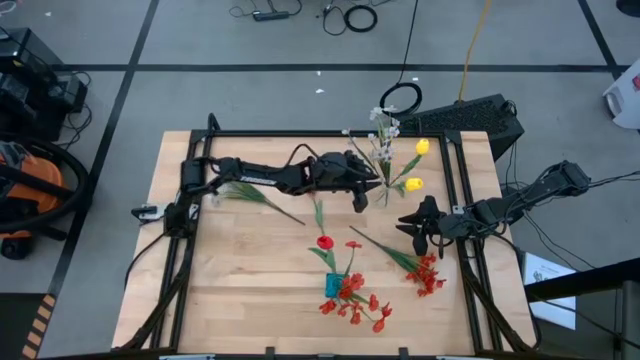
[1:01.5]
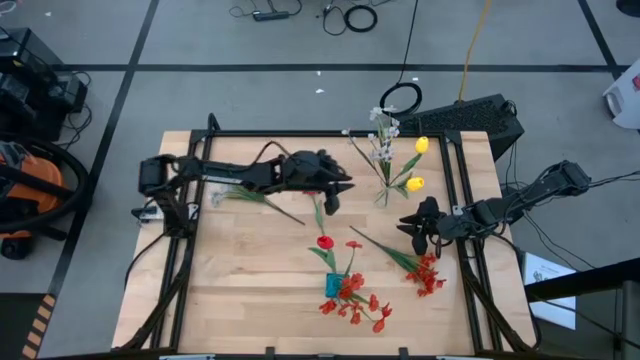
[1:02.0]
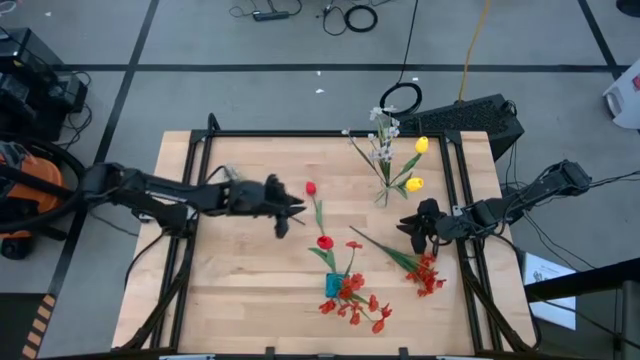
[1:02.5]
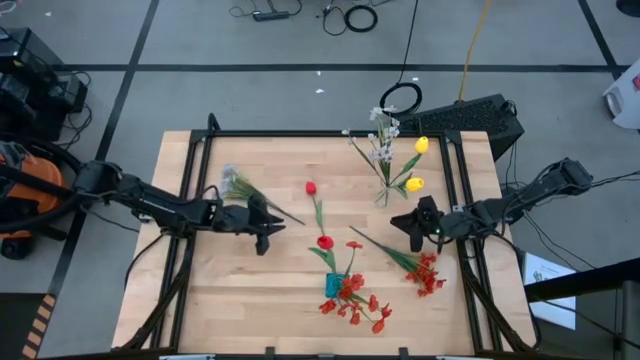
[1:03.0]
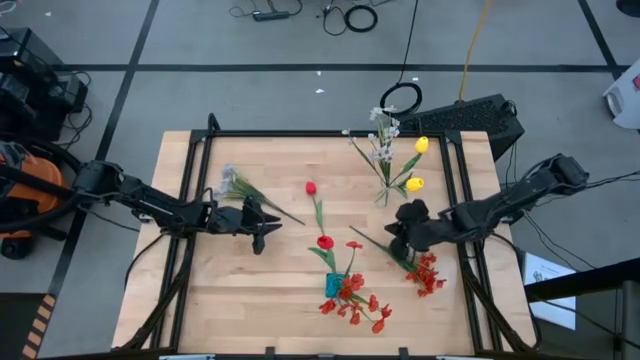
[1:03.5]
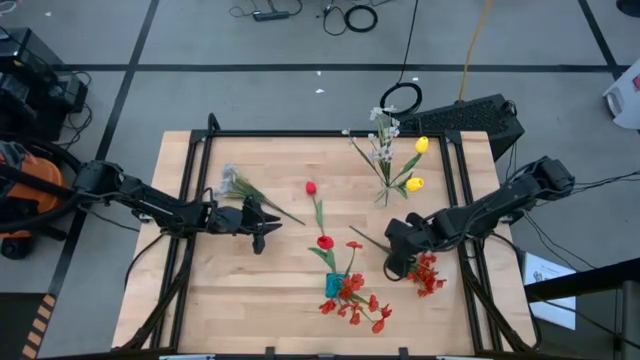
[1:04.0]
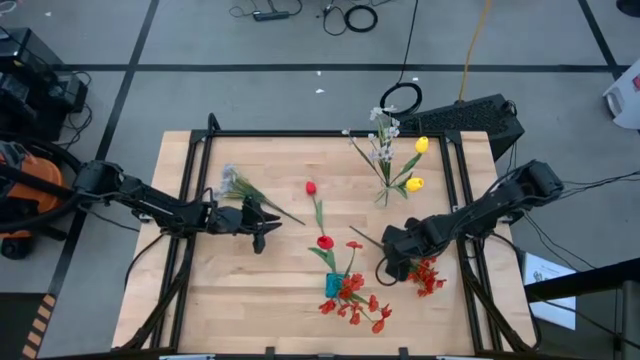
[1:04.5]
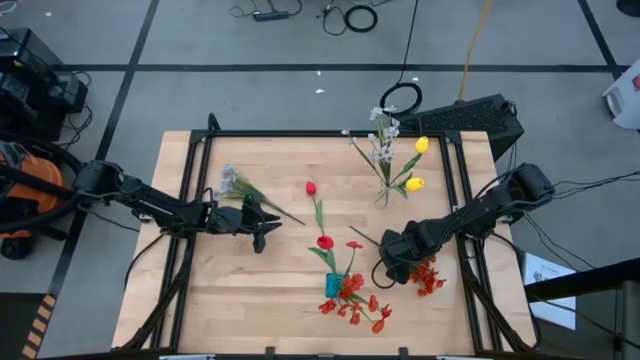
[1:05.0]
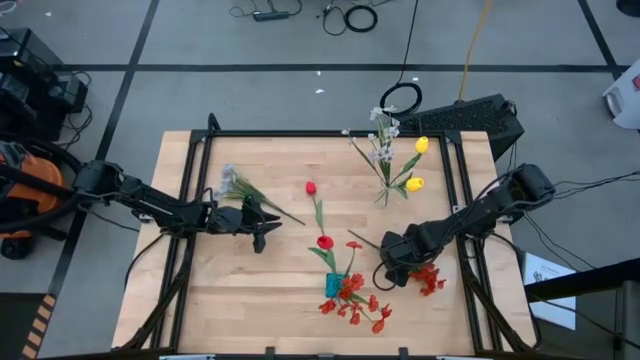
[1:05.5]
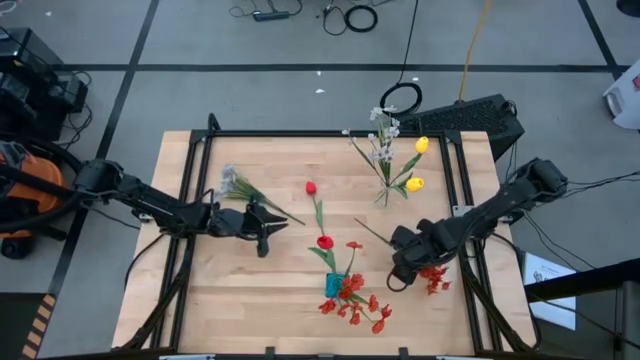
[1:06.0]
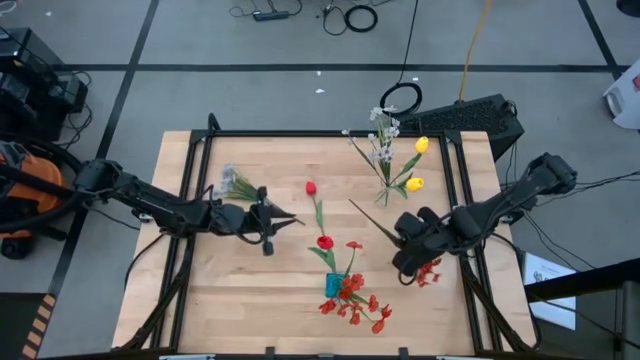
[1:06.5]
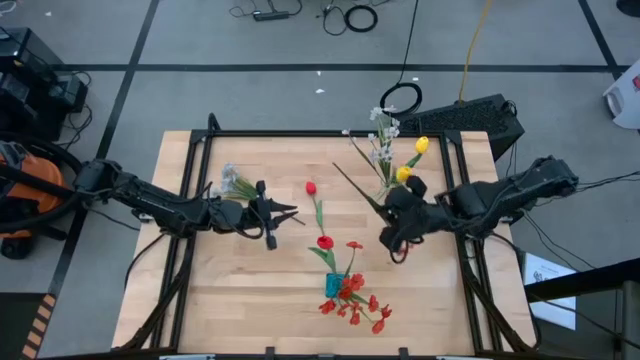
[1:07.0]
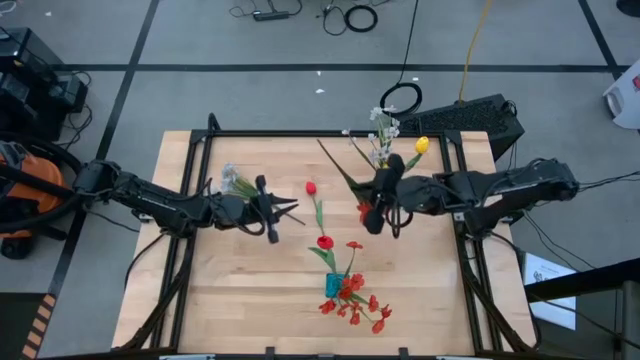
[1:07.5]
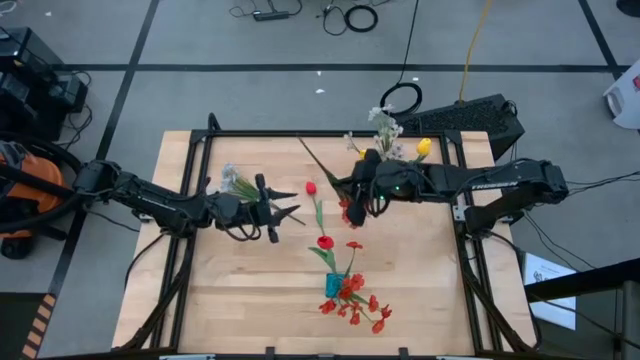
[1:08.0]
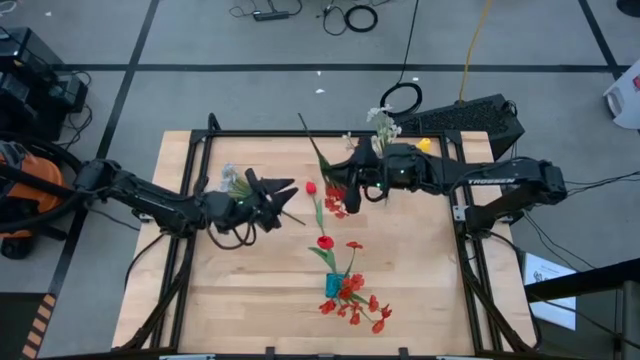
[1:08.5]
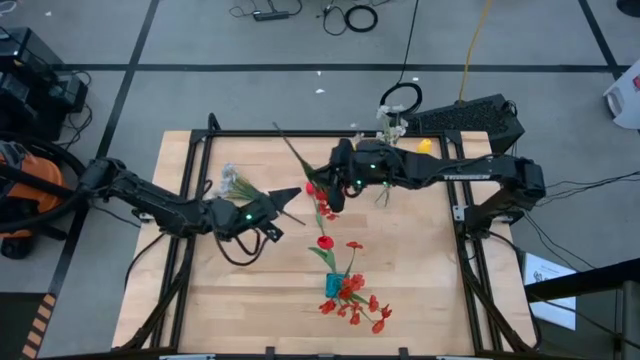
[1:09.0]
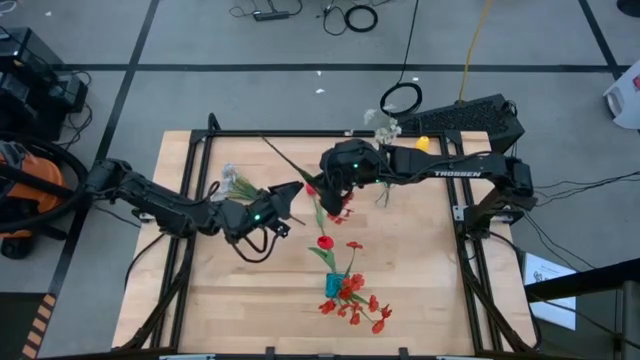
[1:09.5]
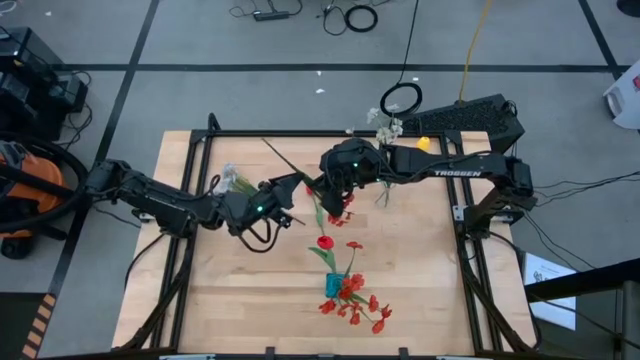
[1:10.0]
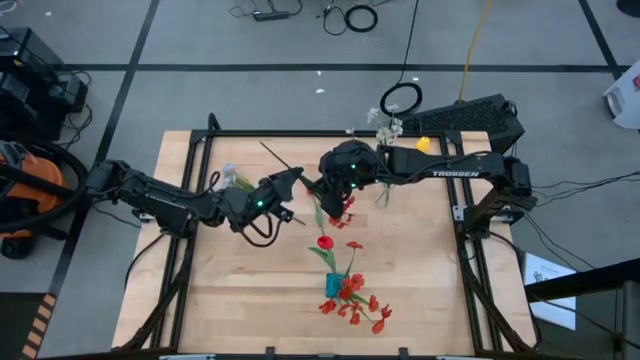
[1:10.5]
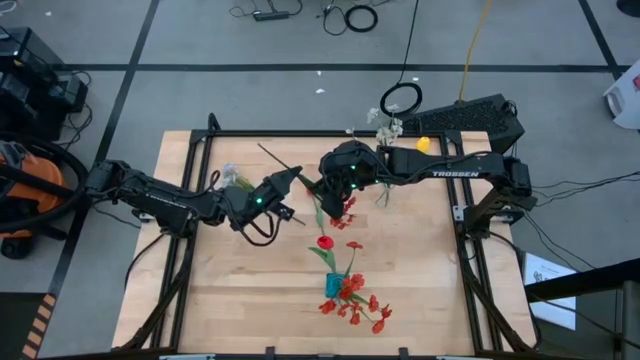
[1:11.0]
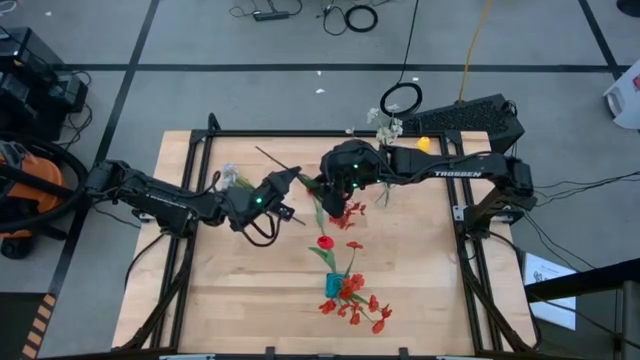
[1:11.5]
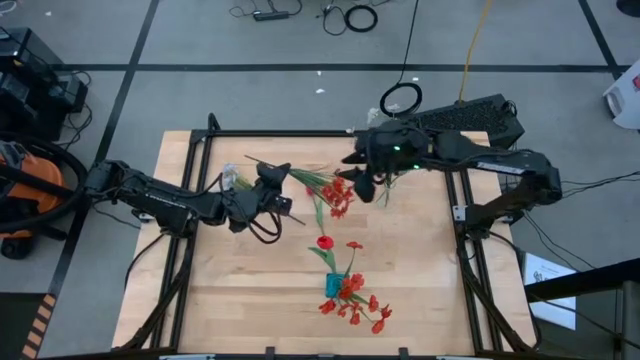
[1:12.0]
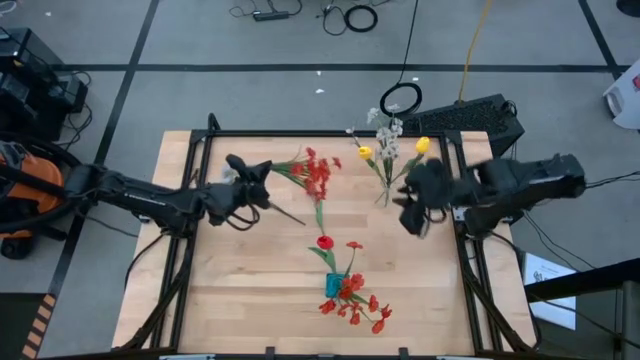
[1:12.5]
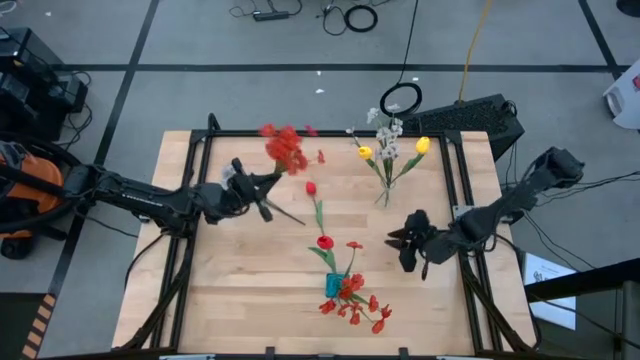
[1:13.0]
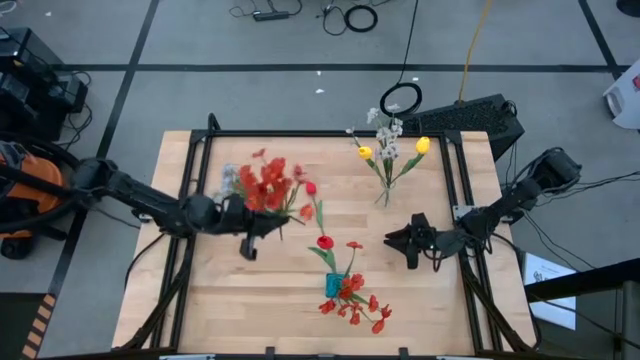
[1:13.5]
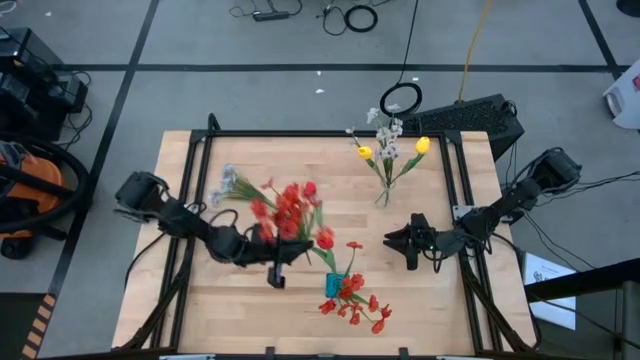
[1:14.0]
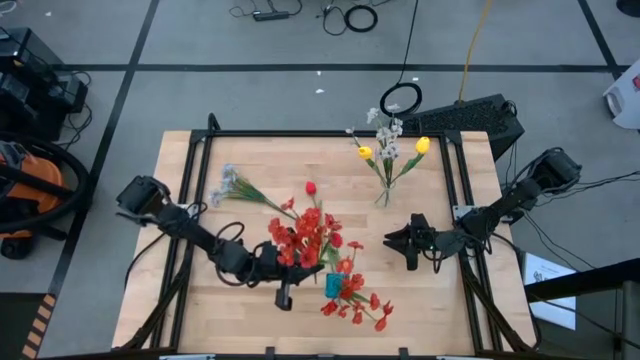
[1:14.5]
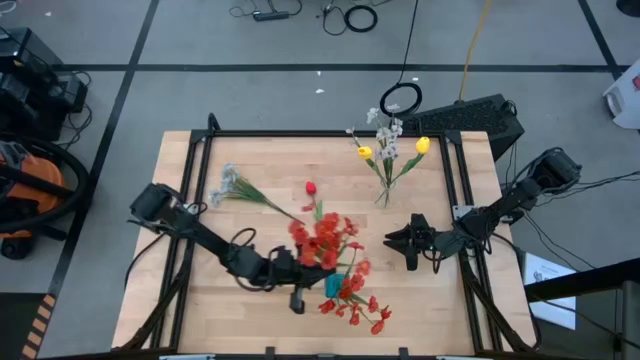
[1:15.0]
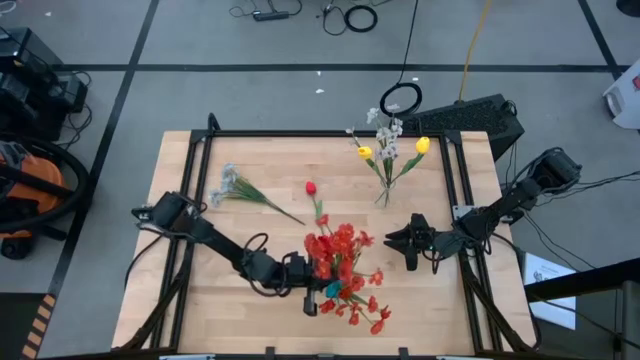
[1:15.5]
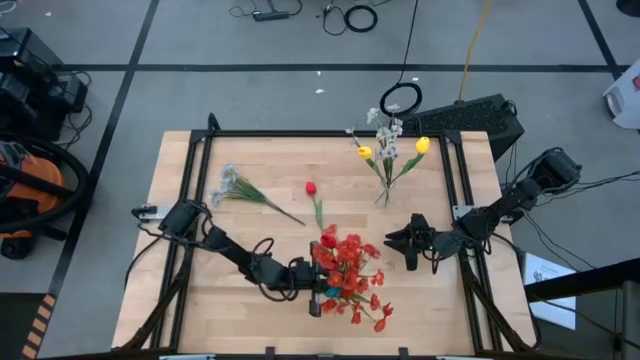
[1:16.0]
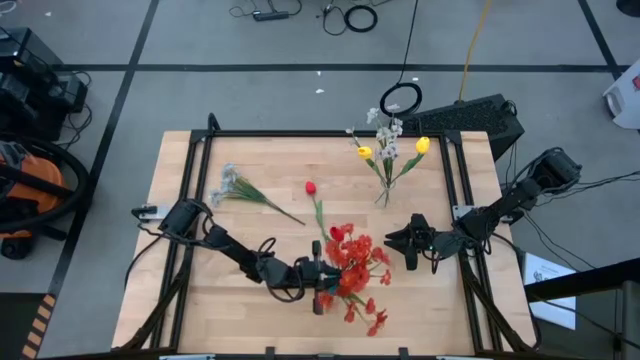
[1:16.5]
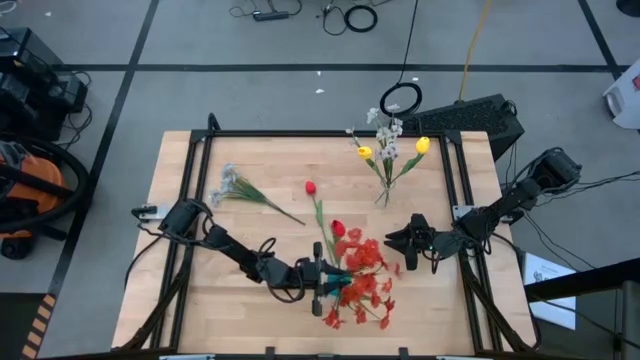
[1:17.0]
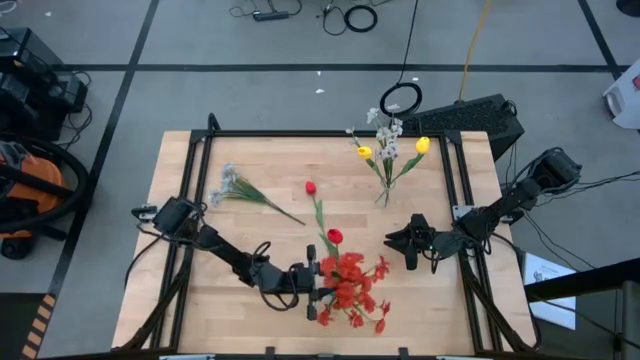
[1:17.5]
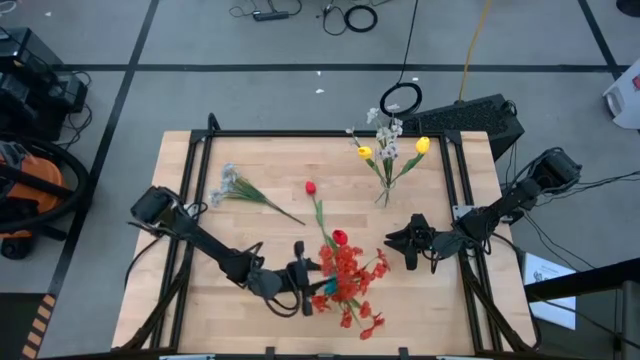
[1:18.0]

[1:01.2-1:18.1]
Task: Sort flowers into vase by color
Put the orange flowers into the blue vase

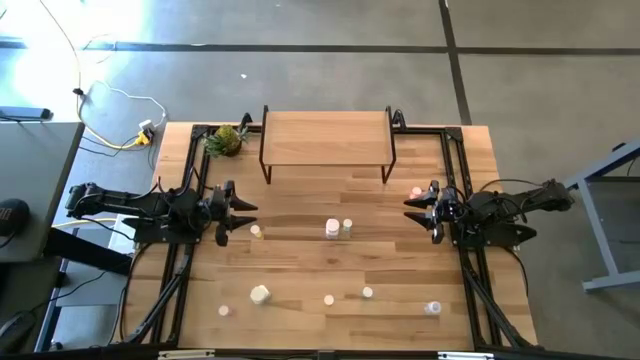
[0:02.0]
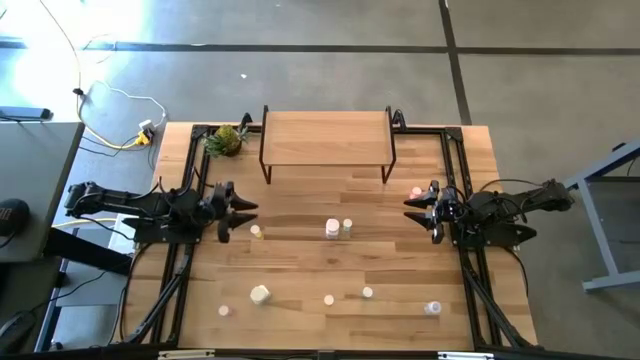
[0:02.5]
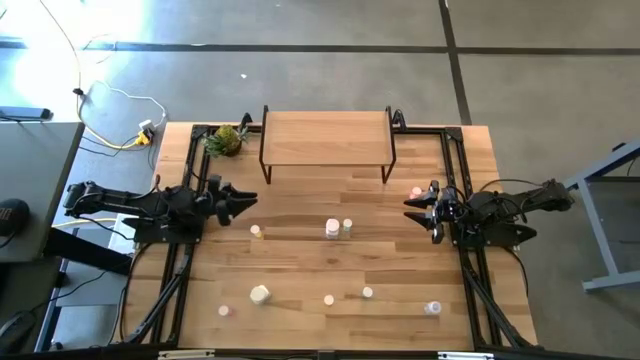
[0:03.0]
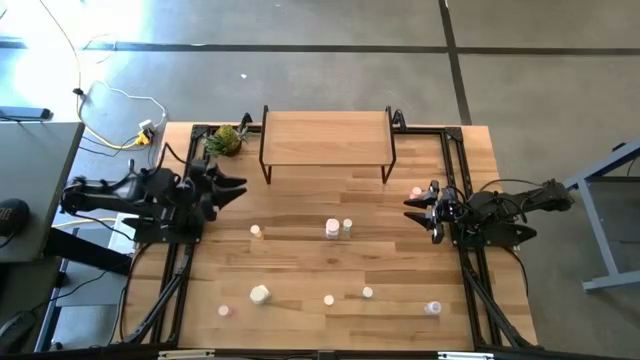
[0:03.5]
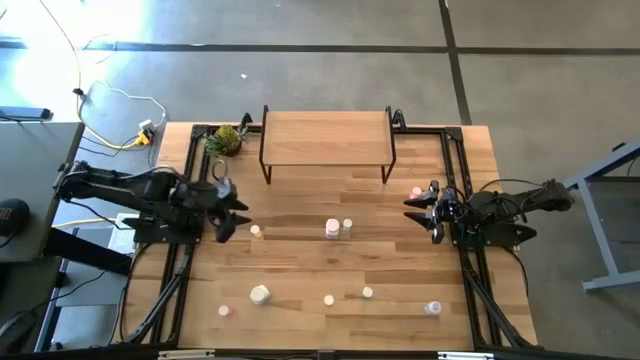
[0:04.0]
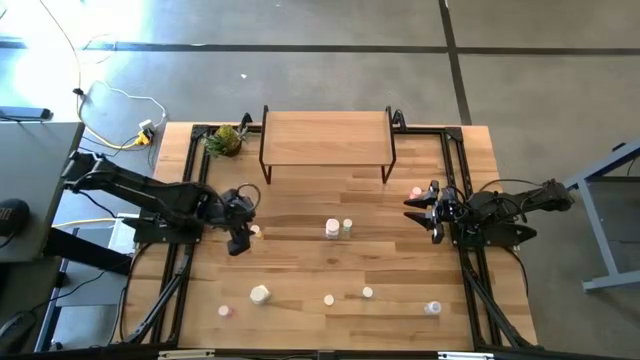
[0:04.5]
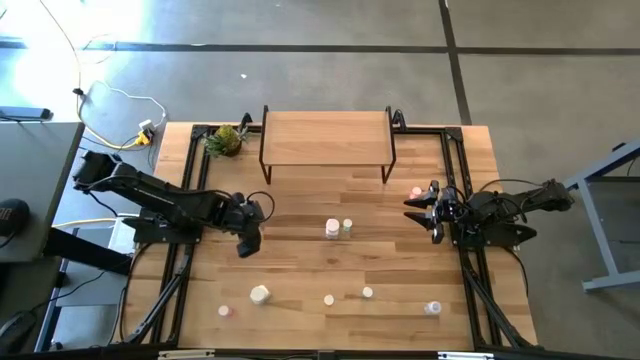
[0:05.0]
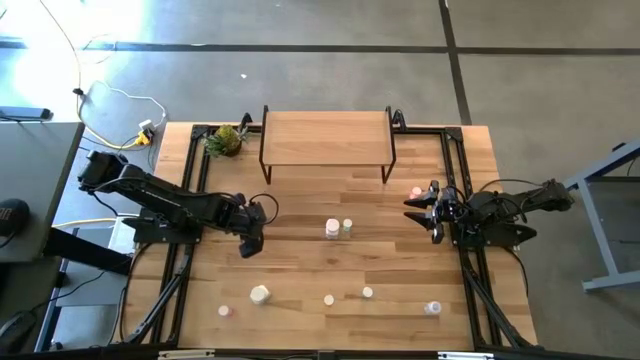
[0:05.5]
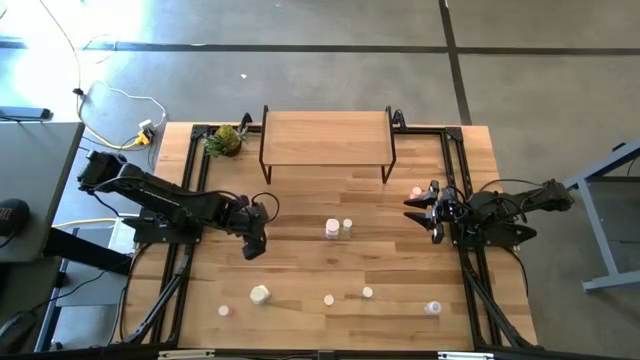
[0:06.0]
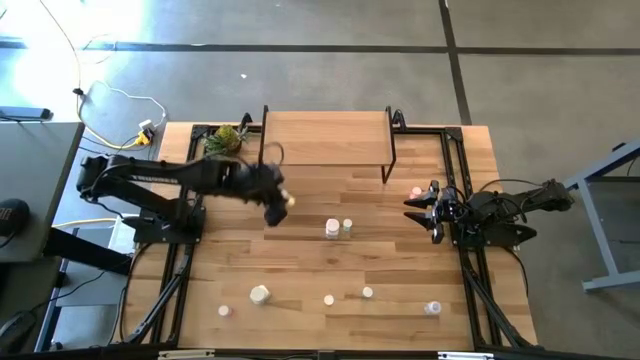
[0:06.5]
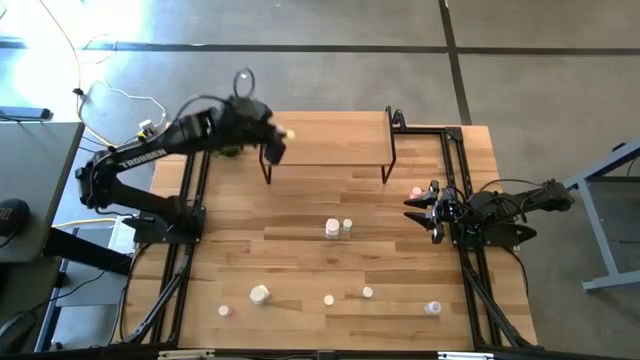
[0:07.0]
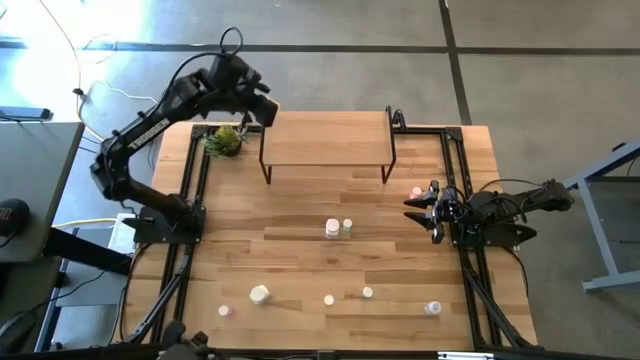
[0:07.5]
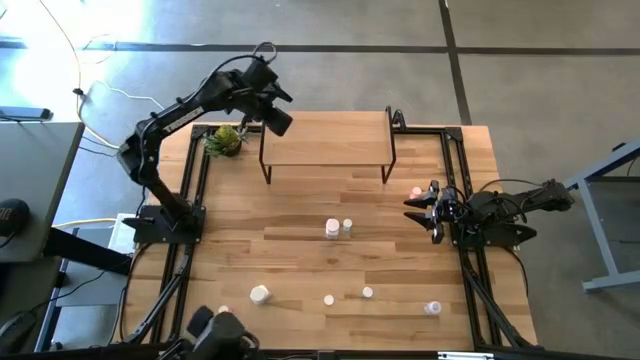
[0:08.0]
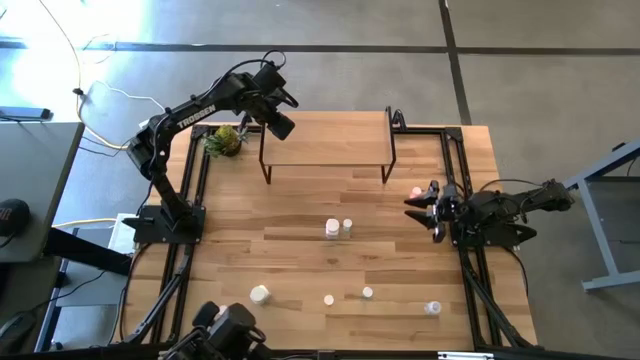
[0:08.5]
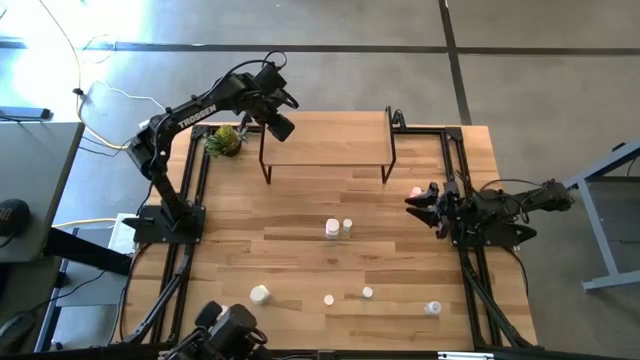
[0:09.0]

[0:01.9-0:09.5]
Task: Pick and place medicine bottles onto shelf by color
Put the yellow medicine bottle on the shelf
